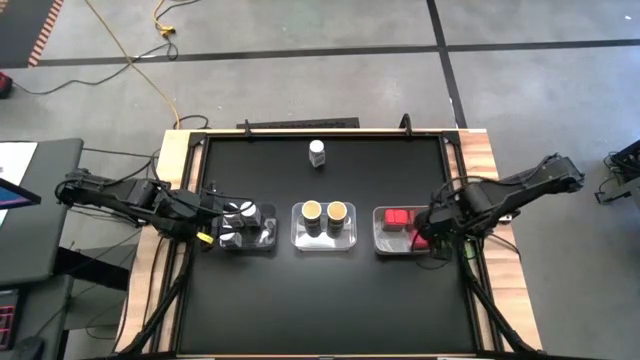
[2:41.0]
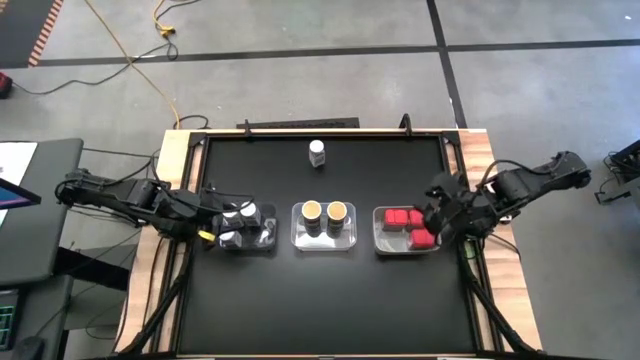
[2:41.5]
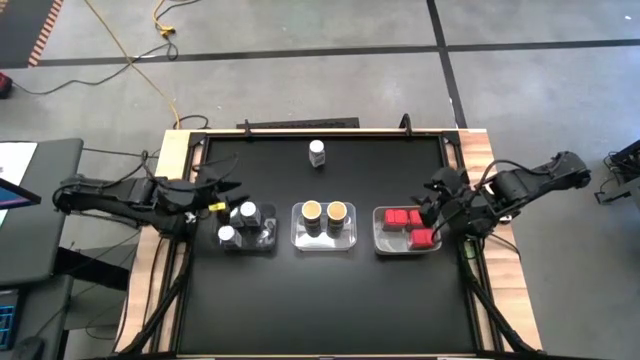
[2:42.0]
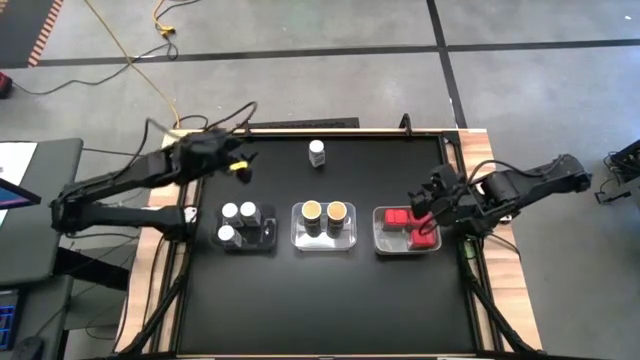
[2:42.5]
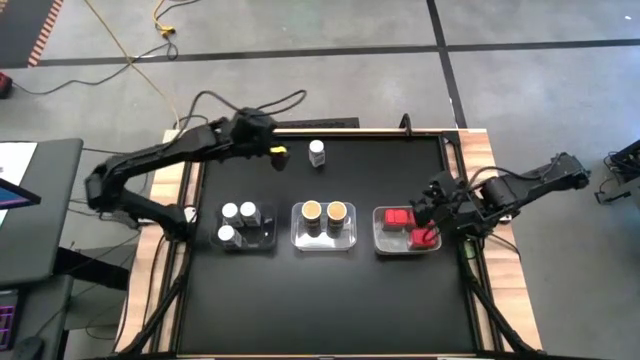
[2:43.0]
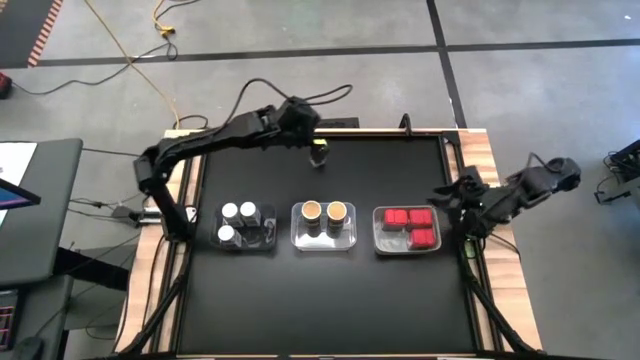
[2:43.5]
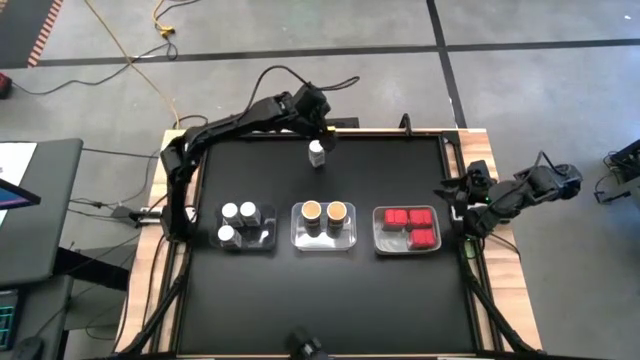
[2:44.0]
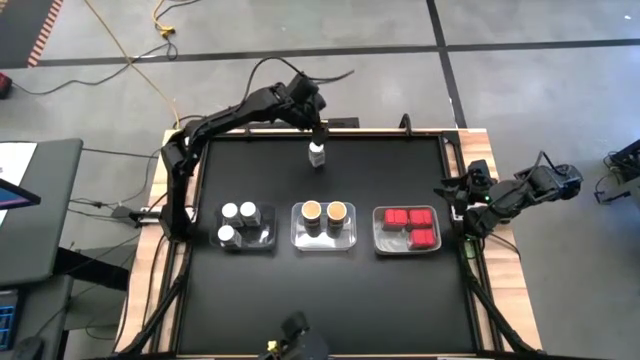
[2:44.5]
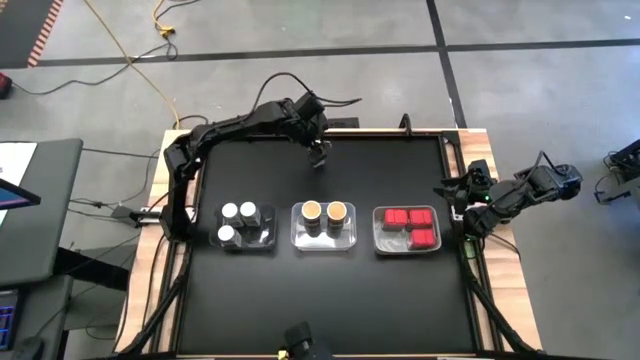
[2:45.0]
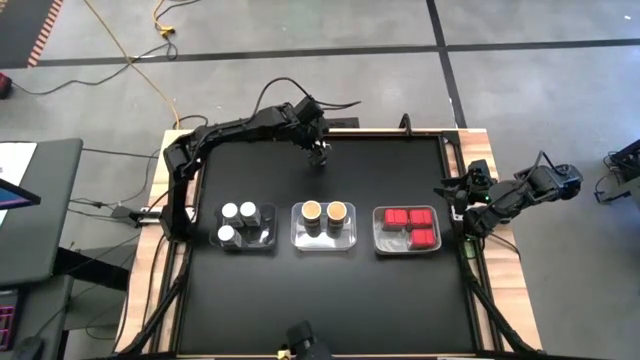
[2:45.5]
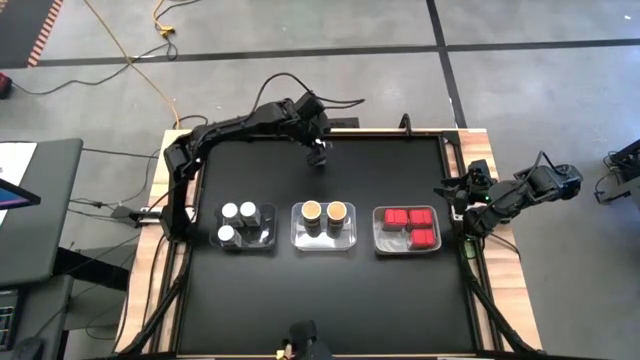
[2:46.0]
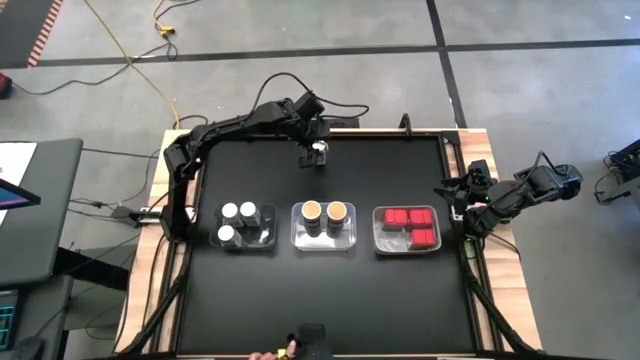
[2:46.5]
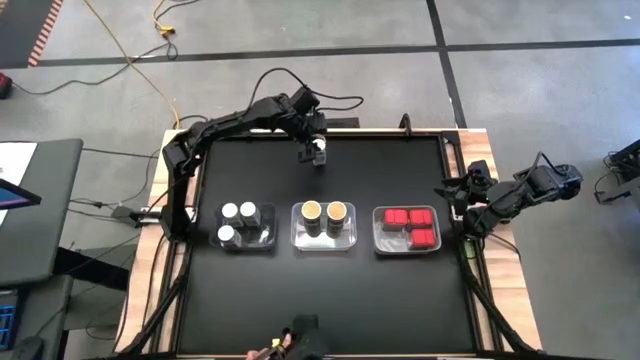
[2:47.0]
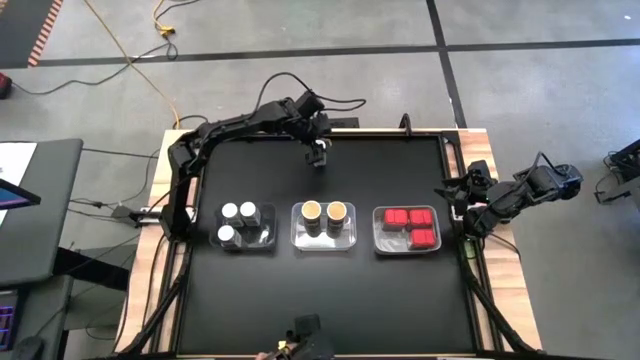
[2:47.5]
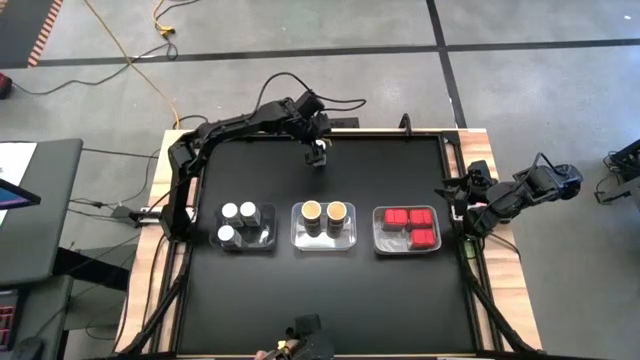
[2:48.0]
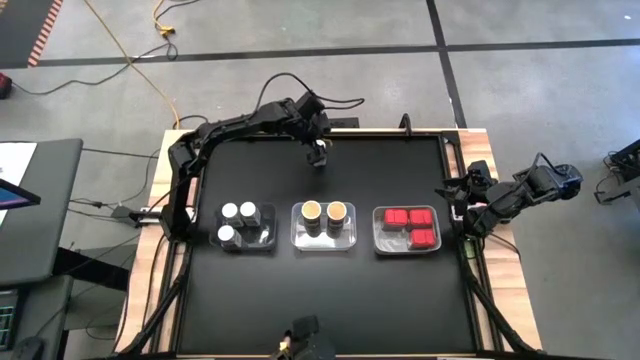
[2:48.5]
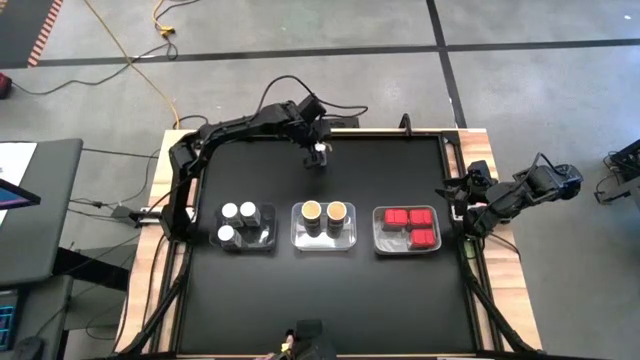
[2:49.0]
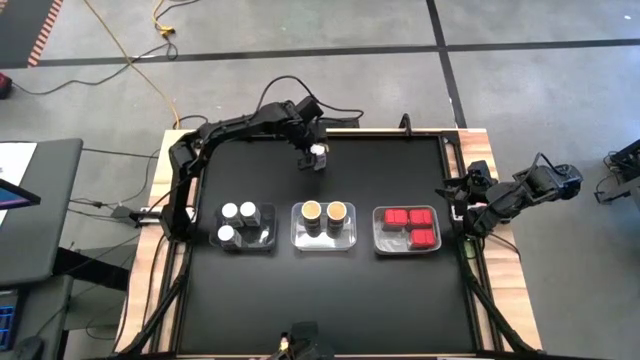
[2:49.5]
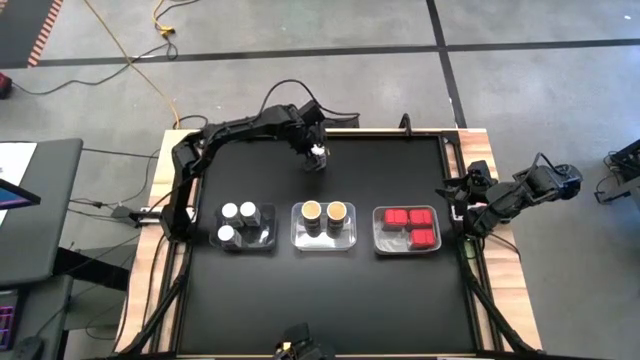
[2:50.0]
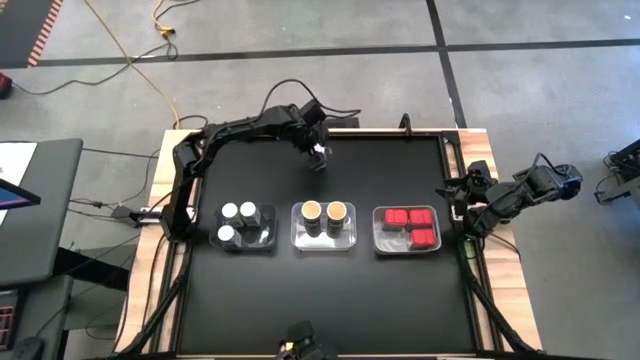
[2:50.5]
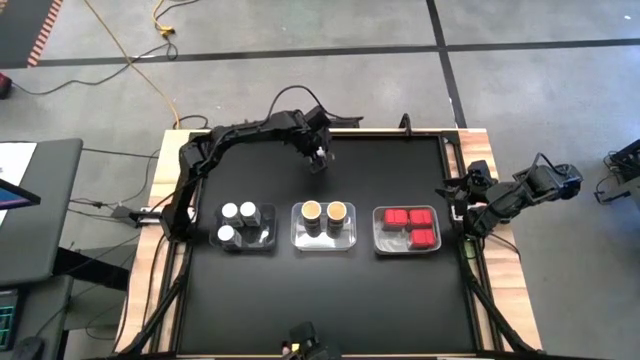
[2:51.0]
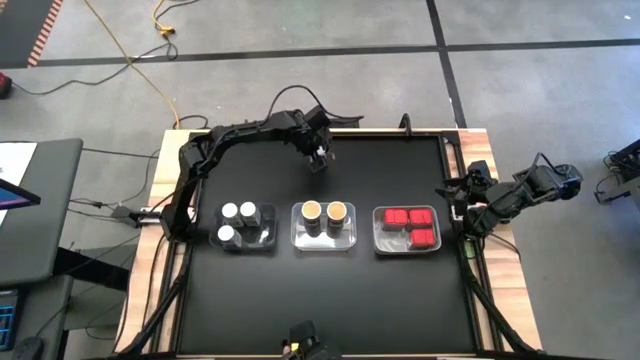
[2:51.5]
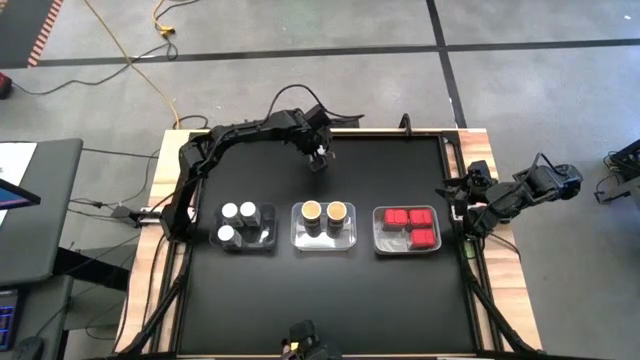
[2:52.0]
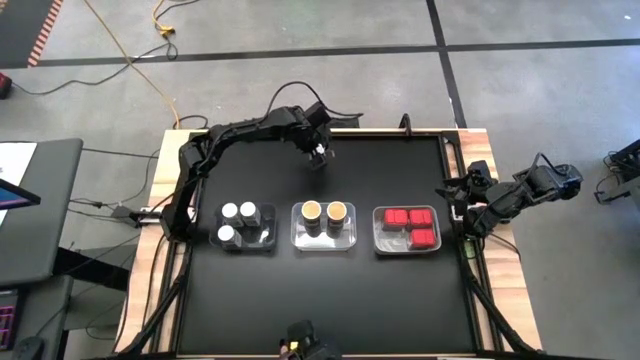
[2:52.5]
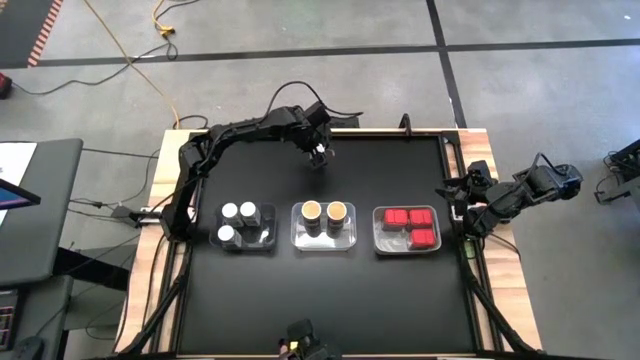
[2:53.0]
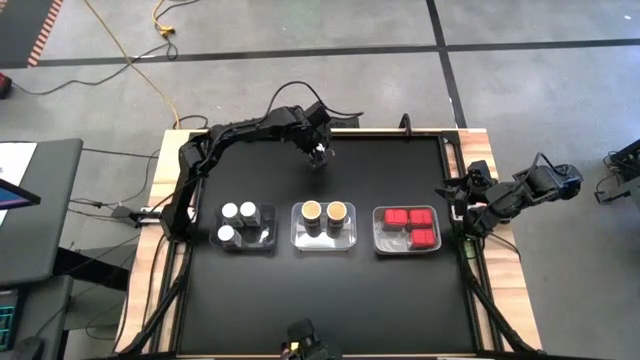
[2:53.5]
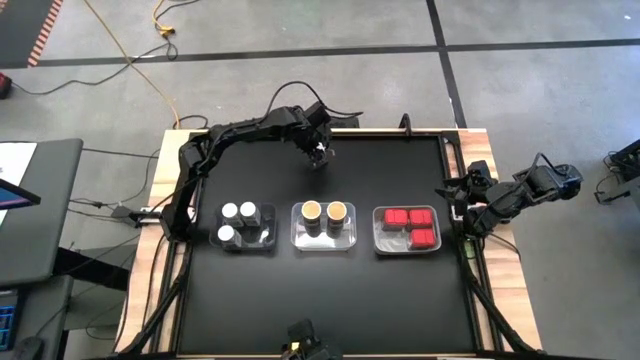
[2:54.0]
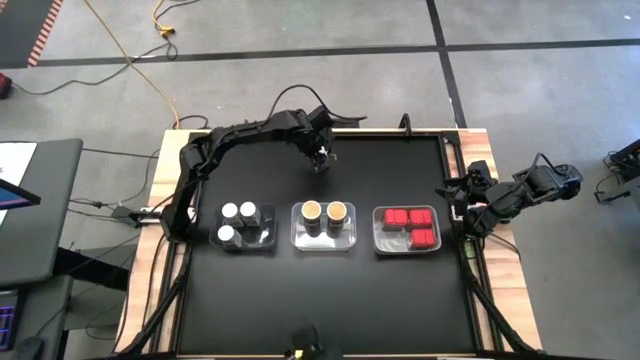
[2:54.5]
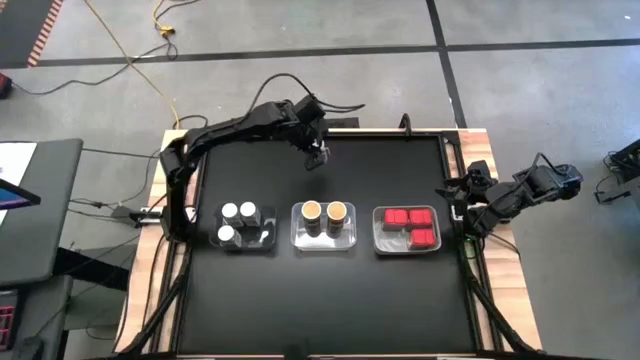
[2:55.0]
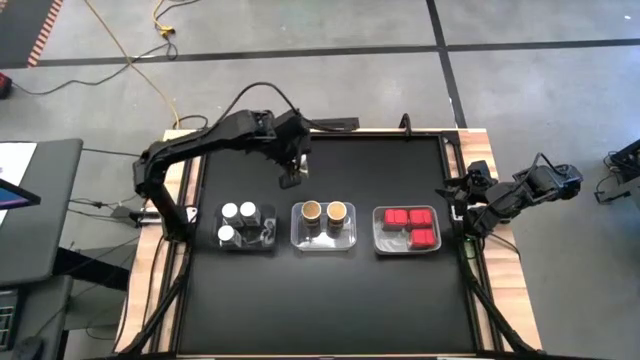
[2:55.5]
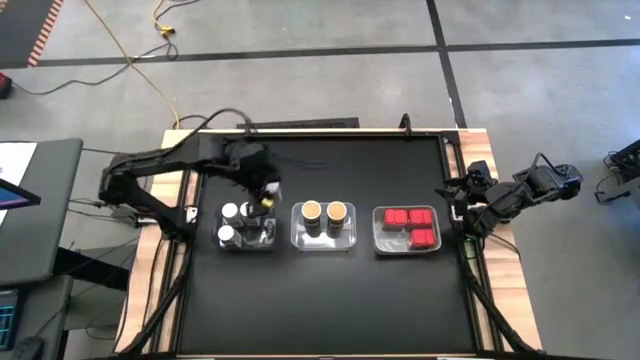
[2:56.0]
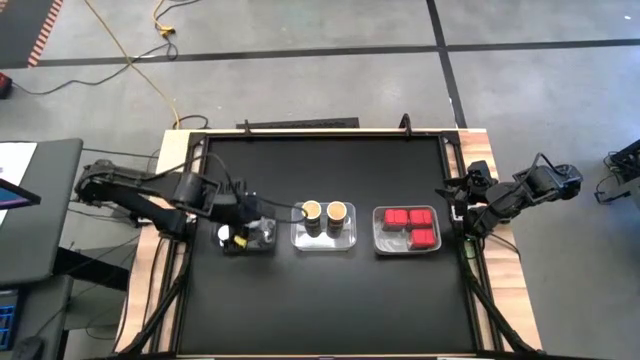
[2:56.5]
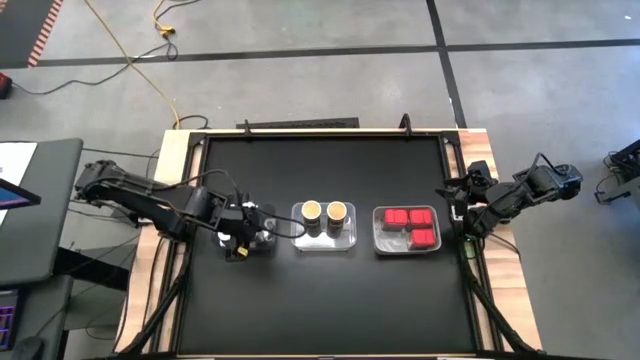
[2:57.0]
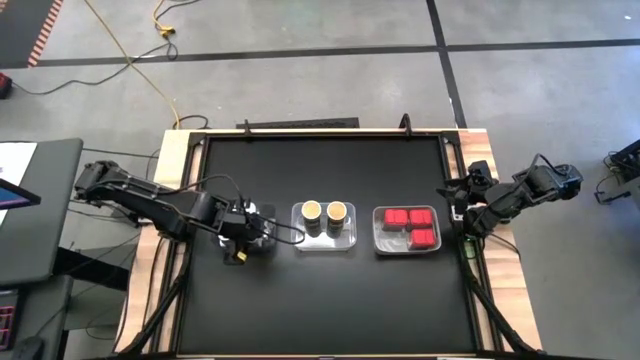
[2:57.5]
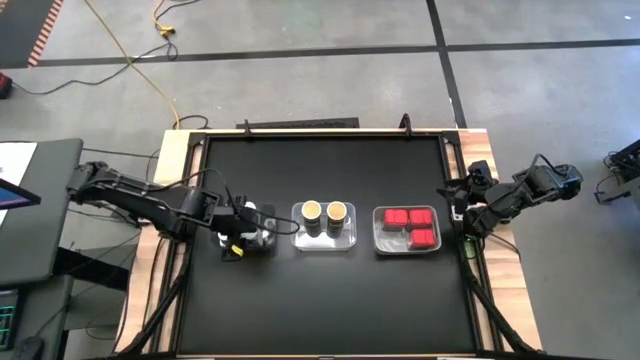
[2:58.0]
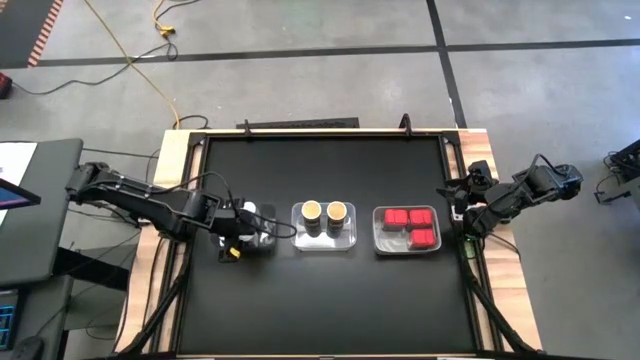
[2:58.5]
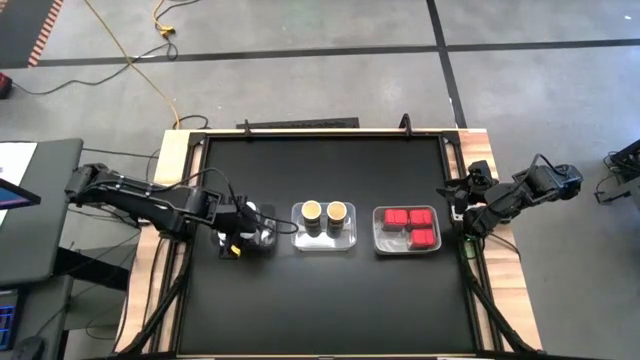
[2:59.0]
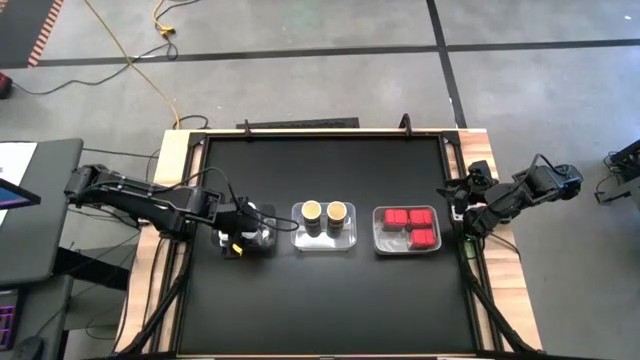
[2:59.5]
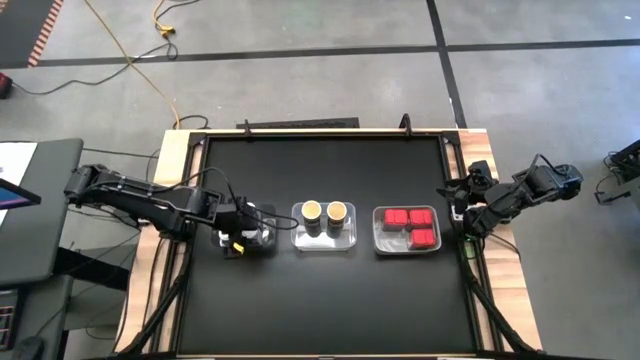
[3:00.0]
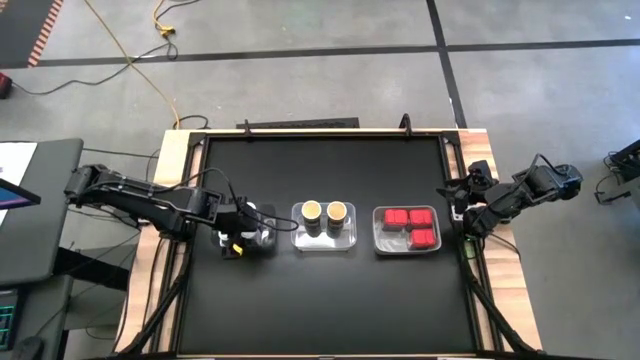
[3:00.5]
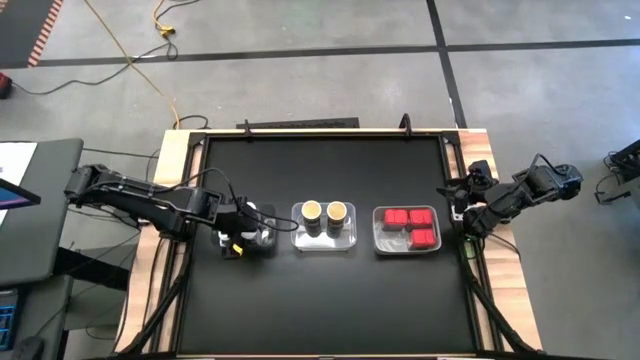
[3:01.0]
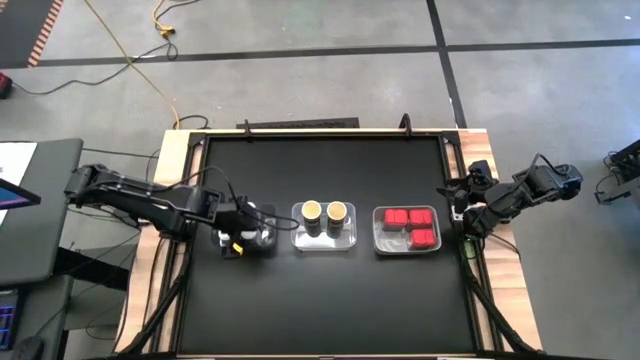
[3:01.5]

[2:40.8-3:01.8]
Task: Sort spices by type
Put the white seasoning bottle into the black bin

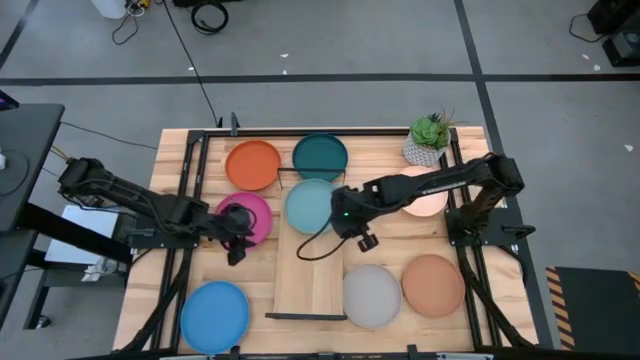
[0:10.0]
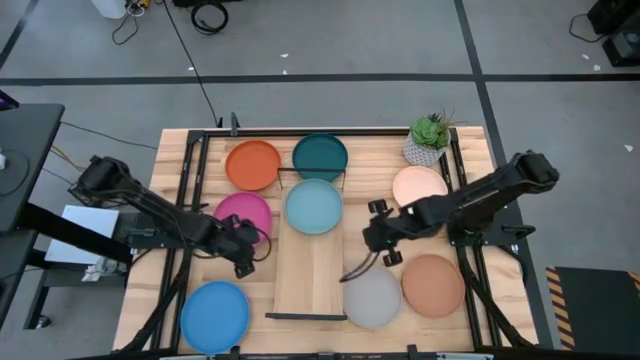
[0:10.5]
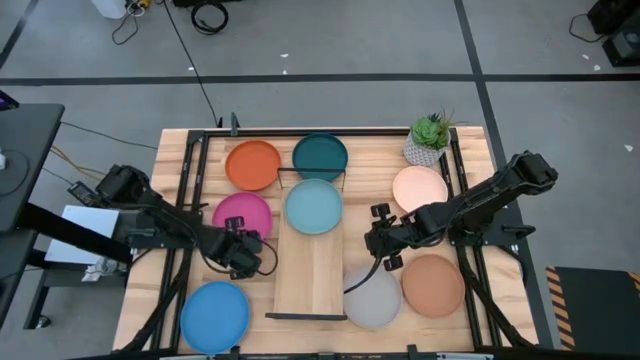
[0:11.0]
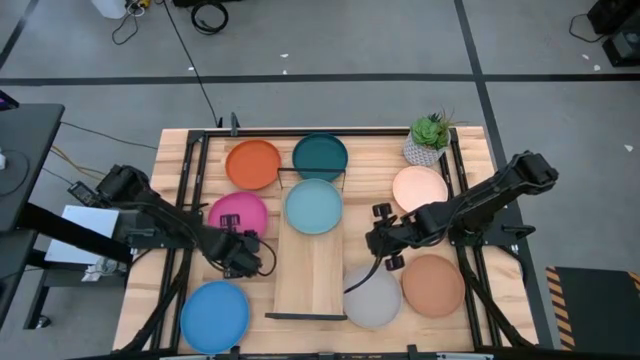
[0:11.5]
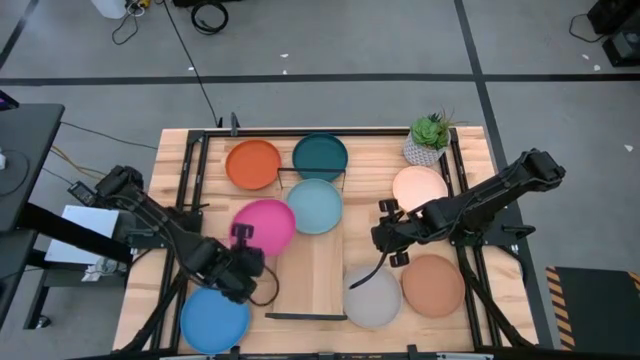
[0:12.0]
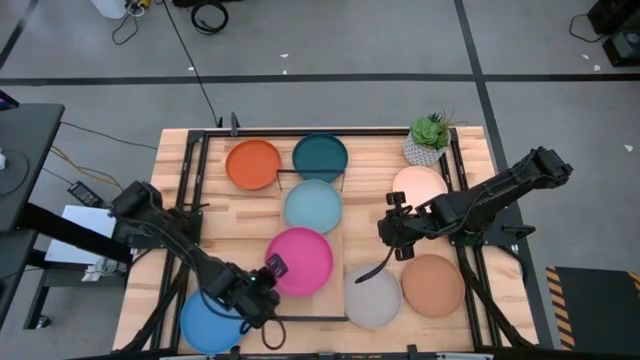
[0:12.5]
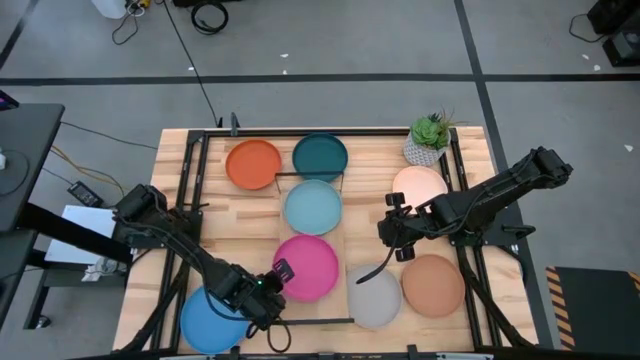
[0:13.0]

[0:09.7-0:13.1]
Task: Place and stack plates onto a shelf
Put the pink plate on the shelf
